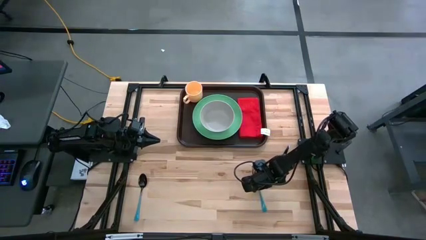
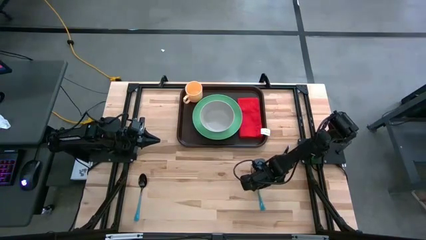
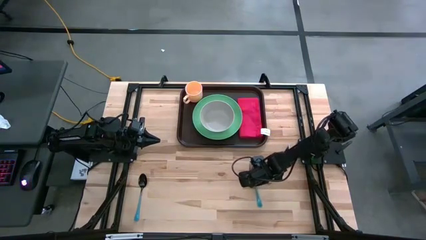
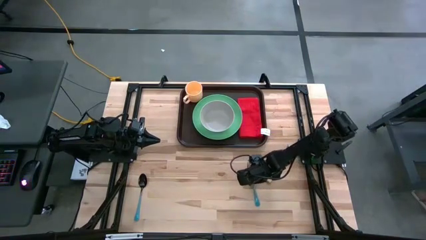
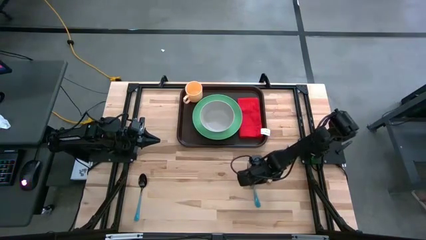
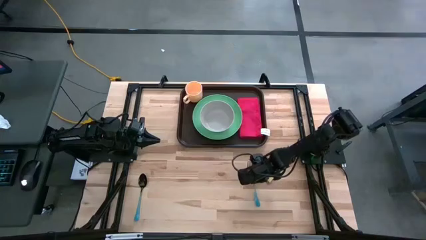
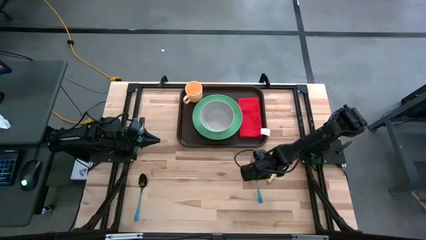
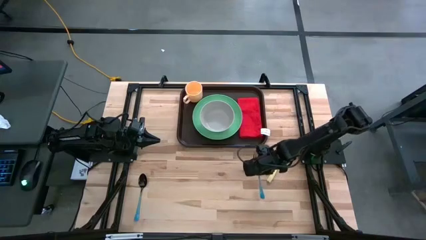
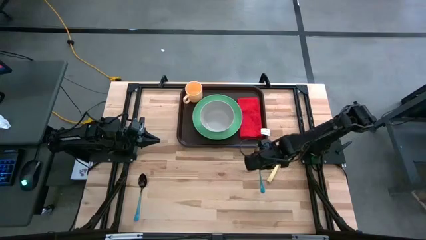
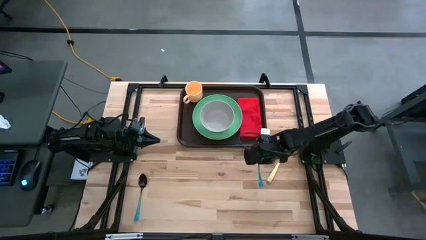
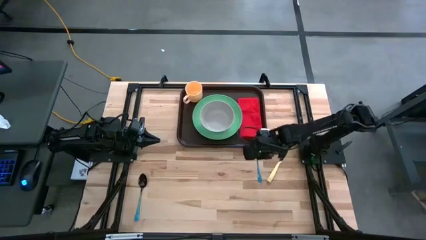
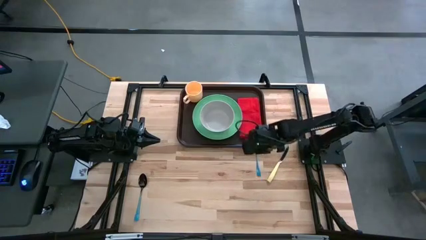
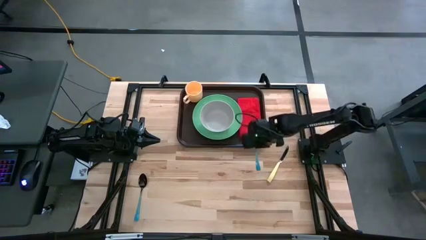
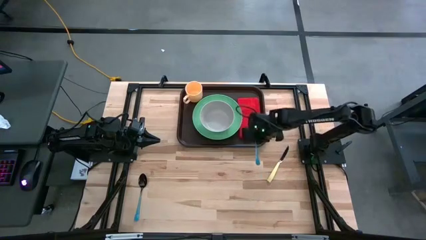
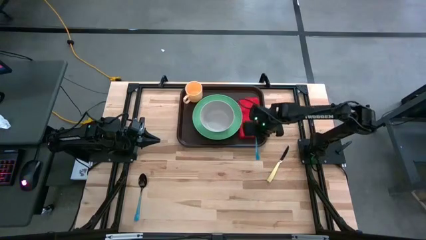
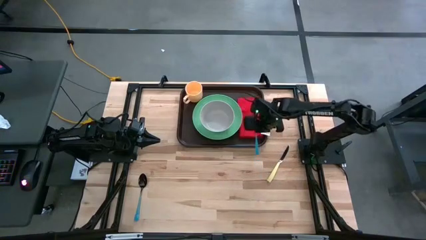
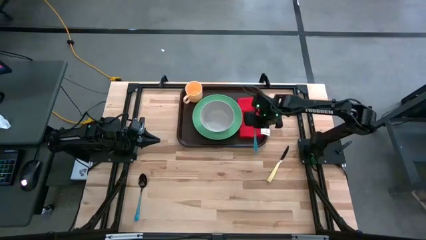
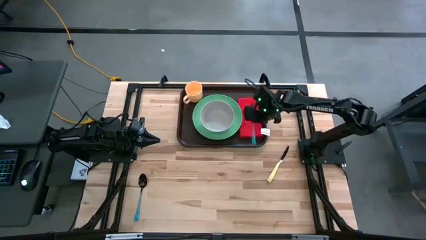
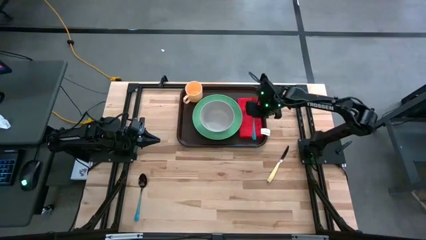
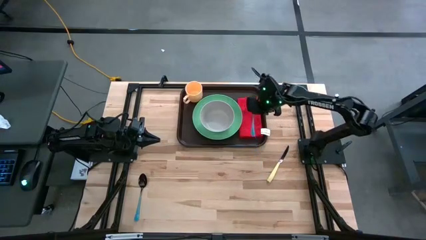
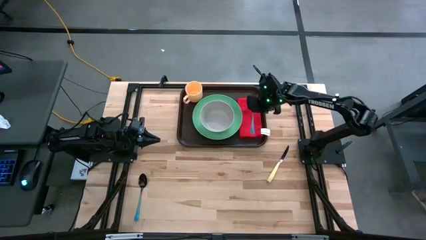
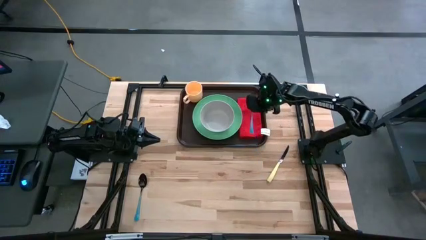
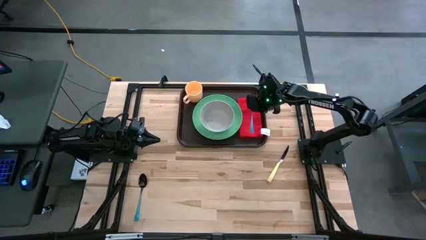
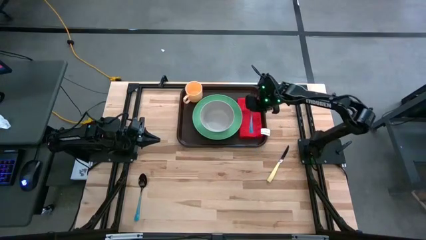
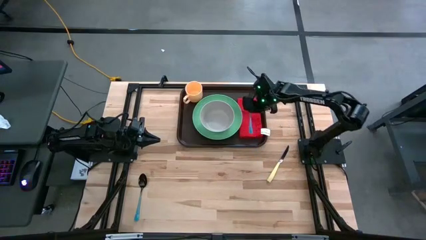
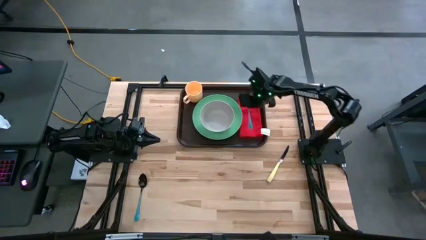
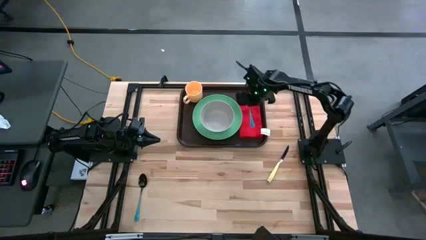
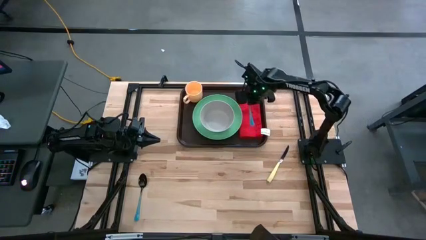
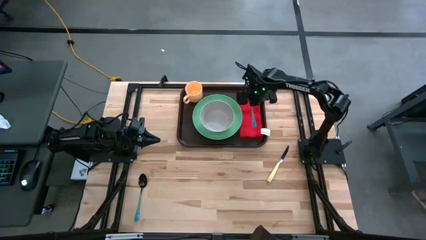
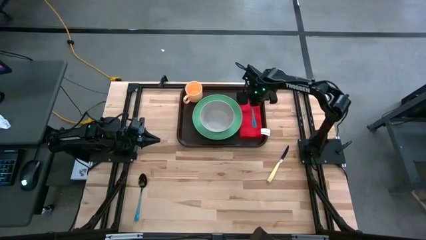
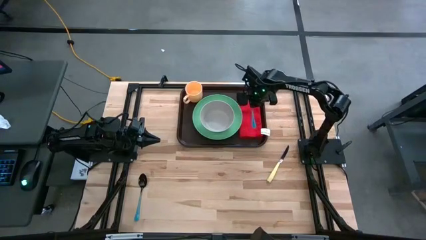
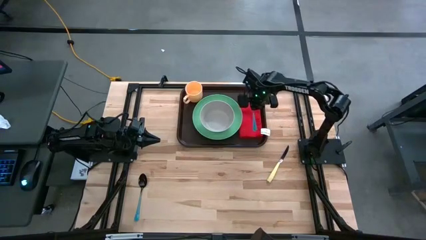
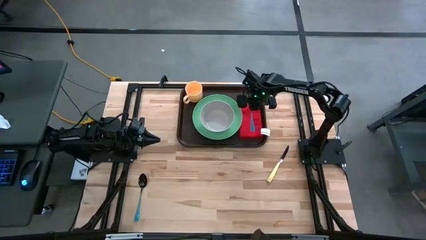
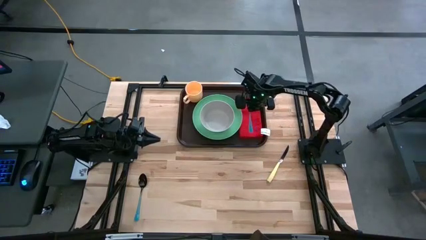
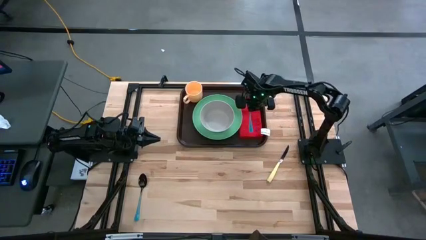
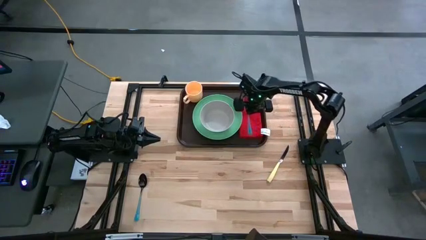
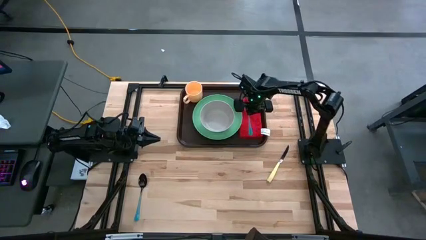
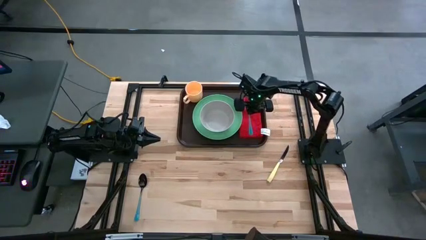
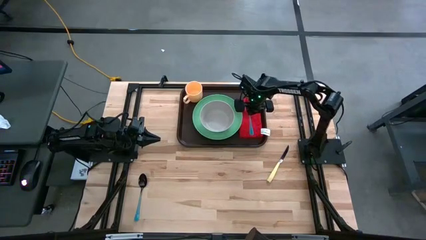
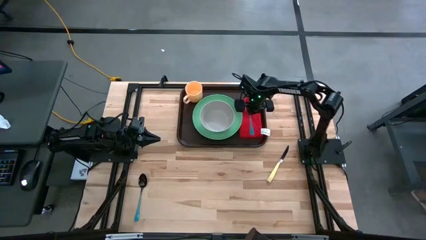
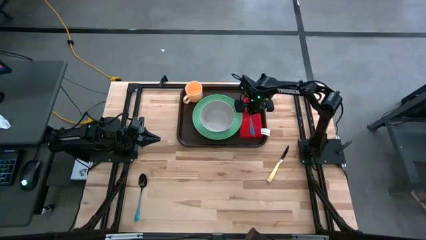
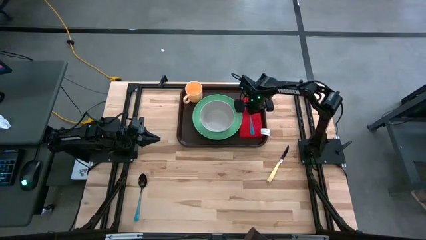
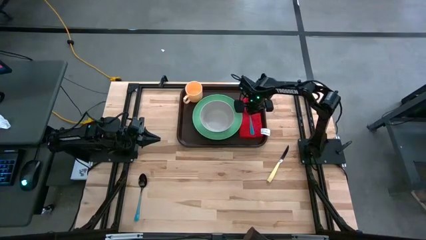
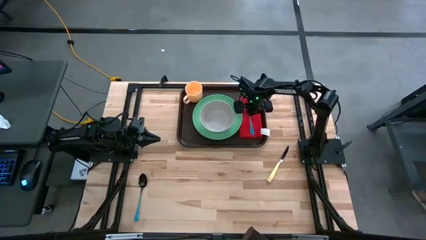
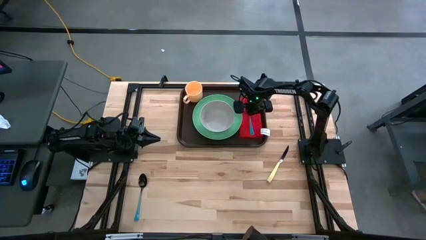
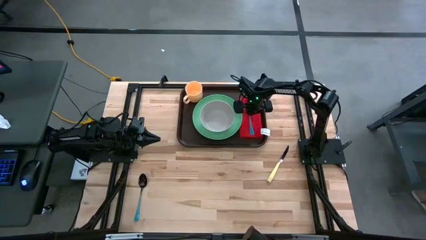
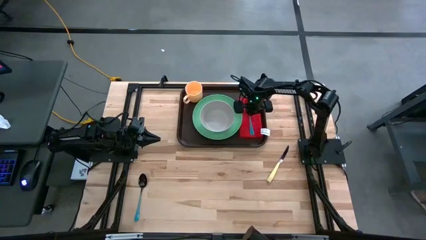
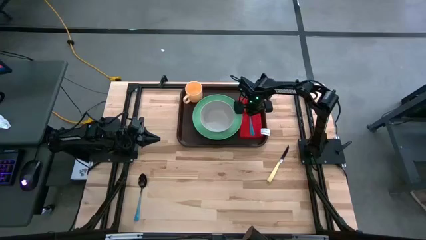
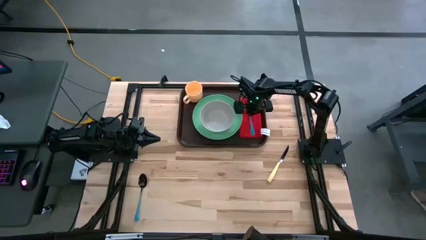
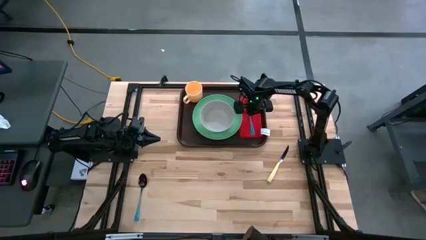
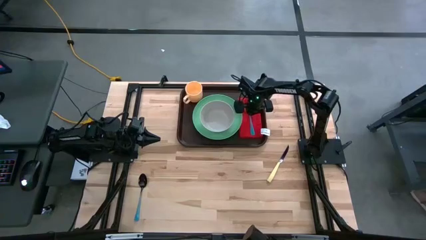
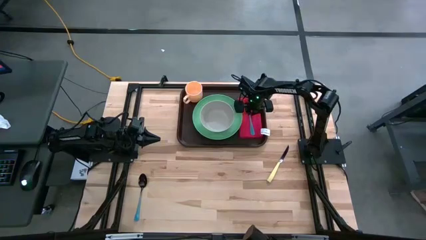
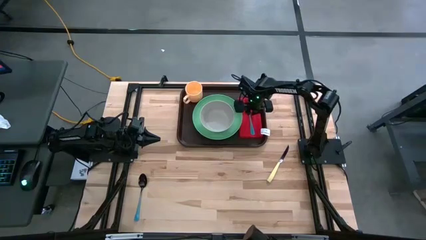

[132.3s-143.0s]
Task: Set up tray
Put the blue fork on top of the red table napkin to the right of the green plate

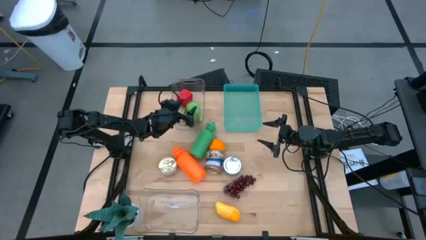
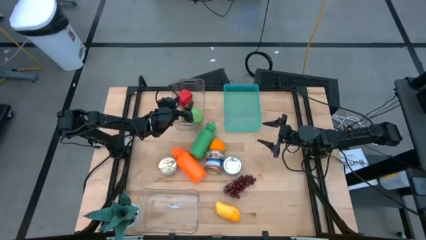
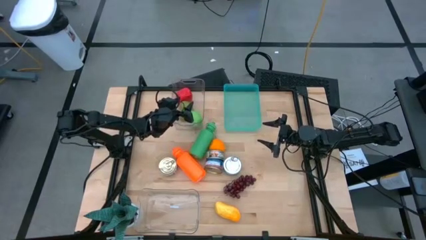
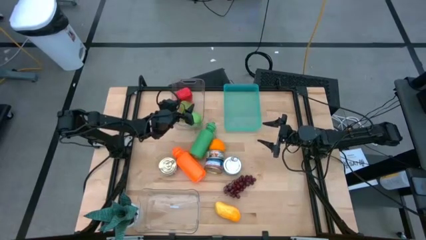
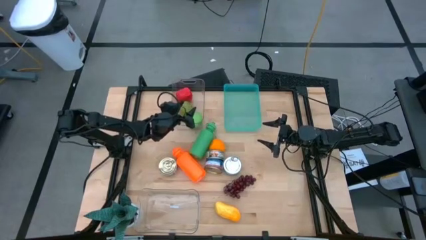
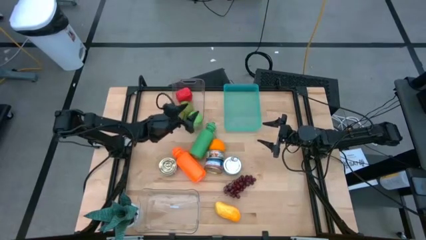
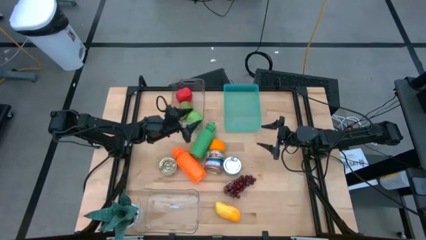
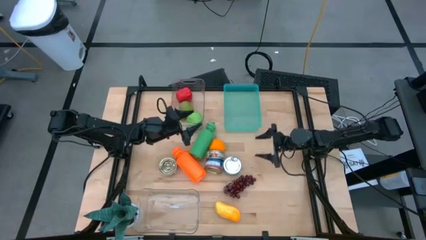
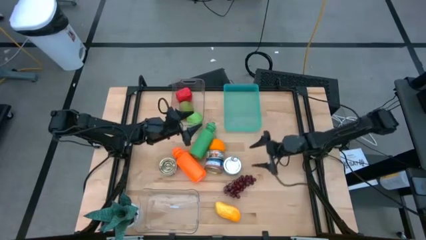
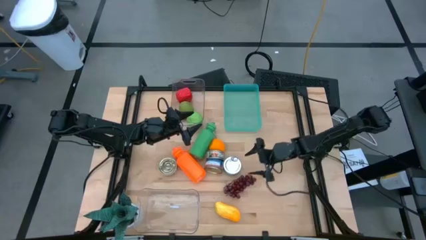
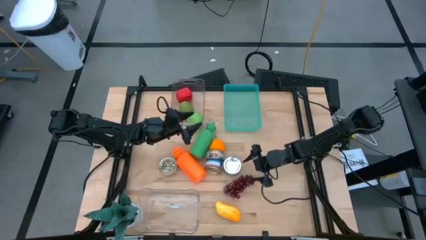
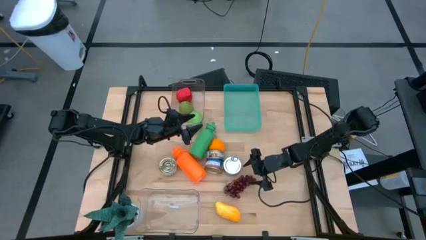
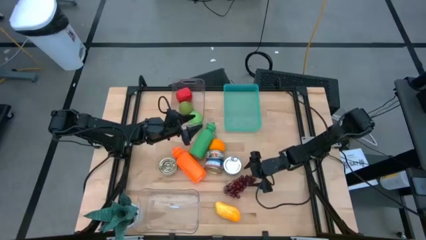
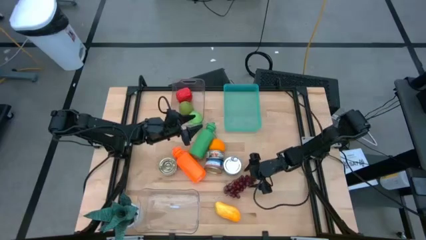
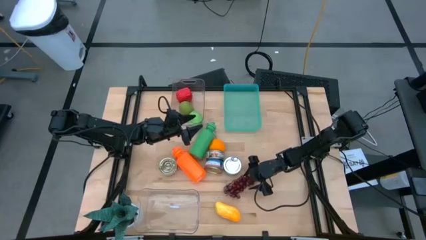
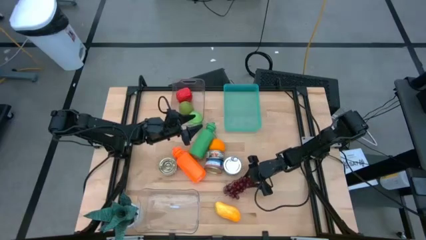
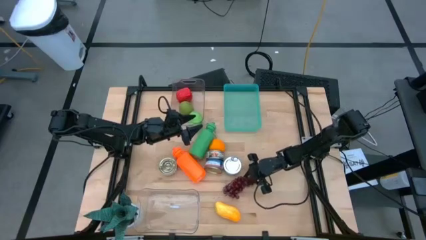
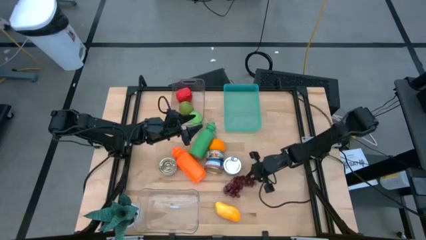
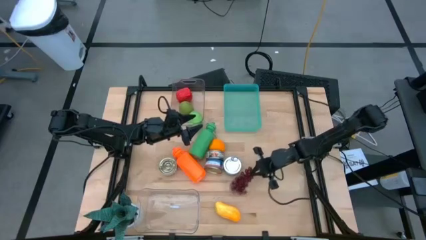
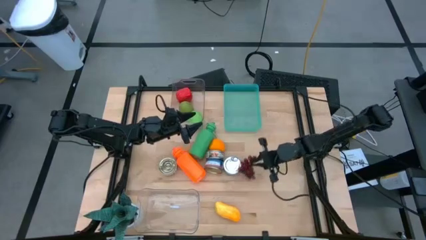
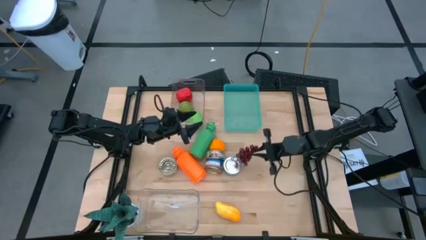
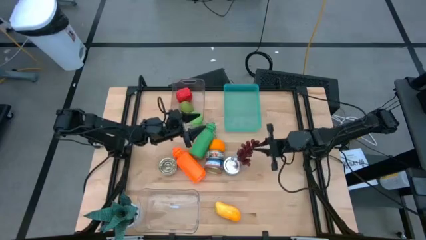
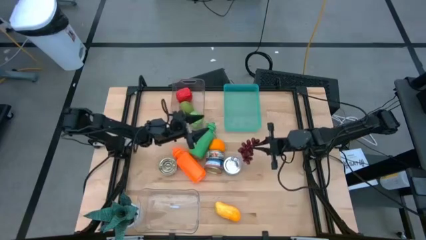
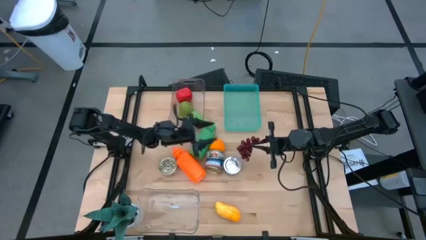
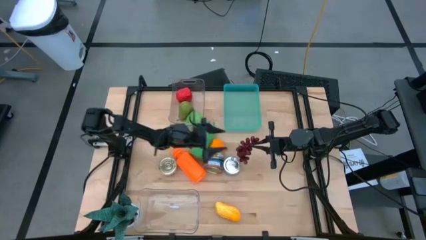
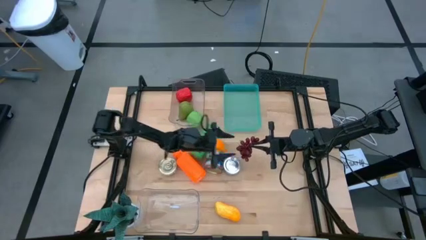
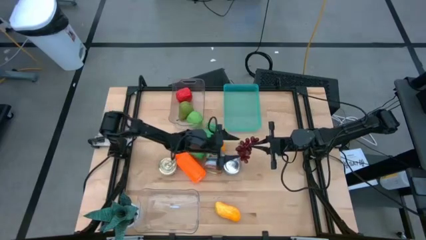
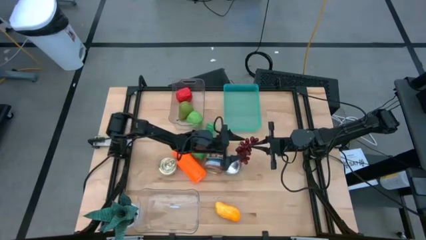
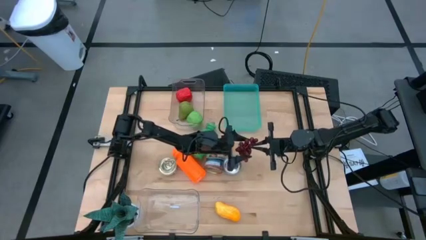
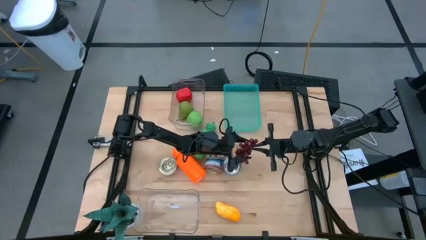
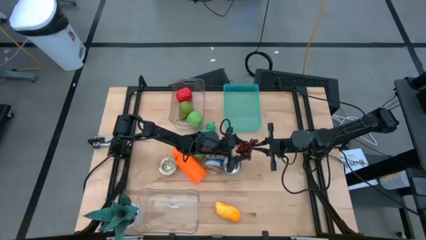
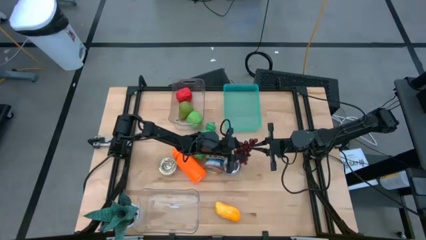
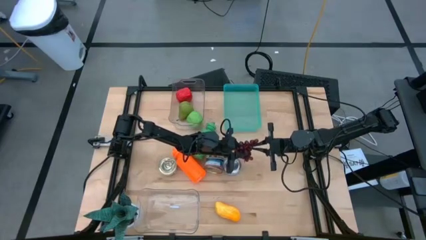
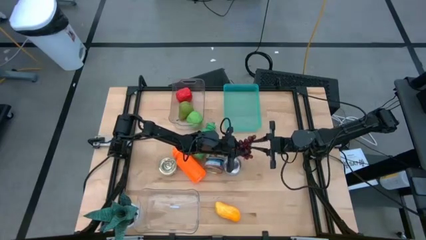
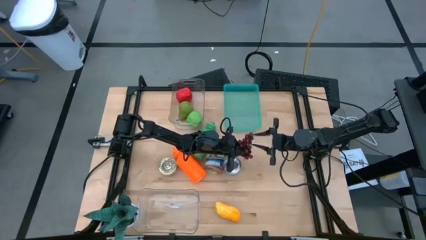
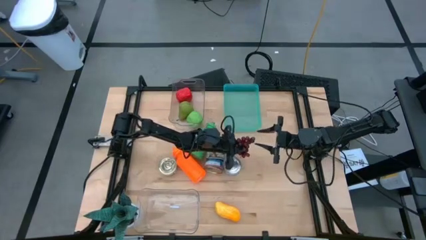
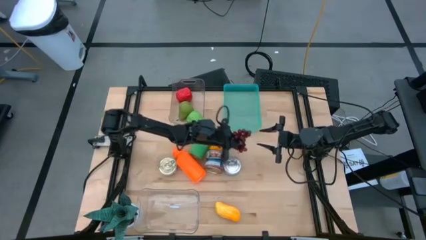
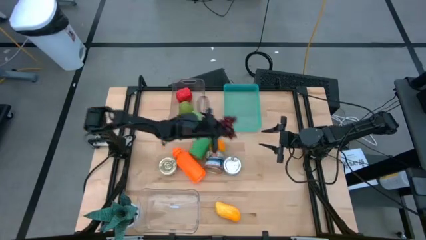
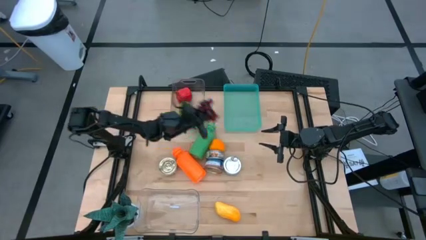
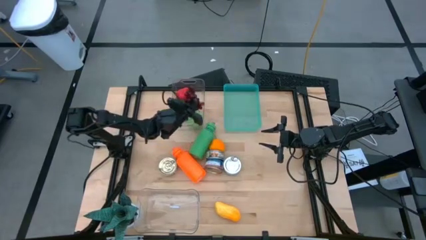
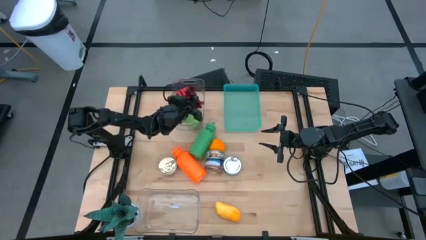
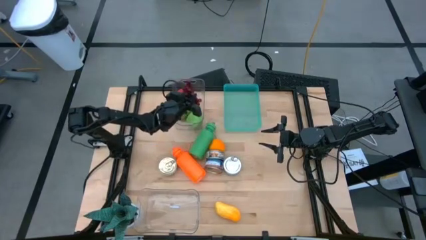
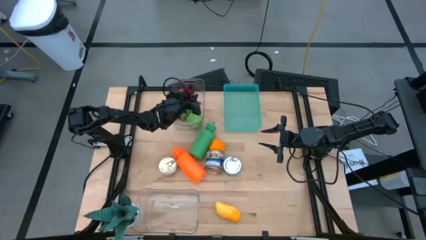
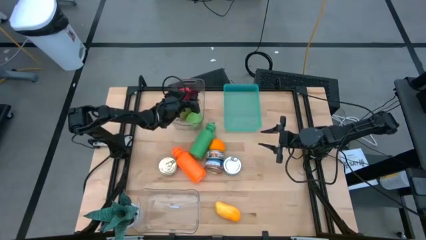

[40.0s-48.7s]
Task: Pick & Place Food Item
Put the purple grapes into the top transparent bin
